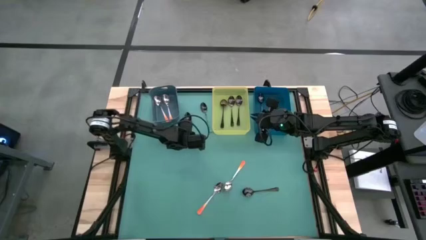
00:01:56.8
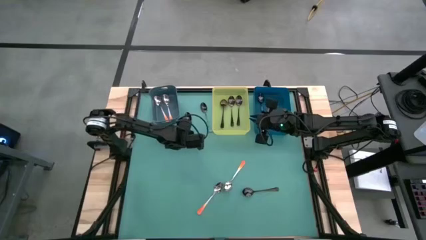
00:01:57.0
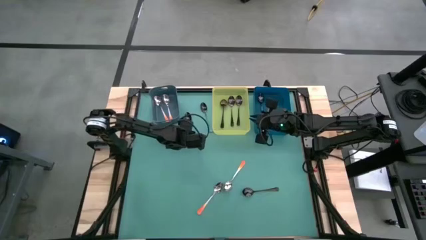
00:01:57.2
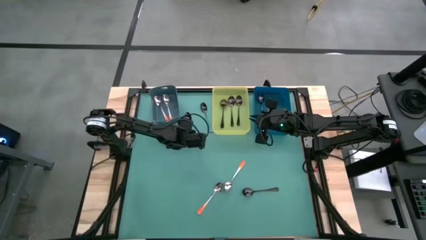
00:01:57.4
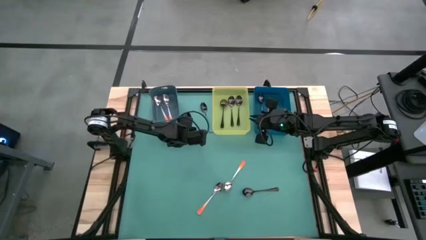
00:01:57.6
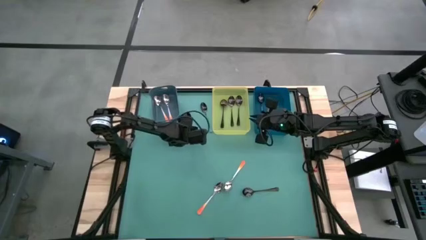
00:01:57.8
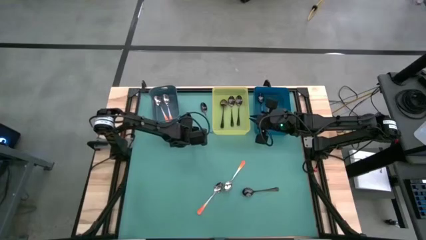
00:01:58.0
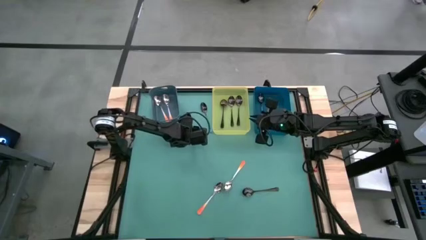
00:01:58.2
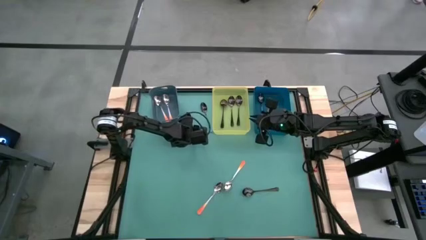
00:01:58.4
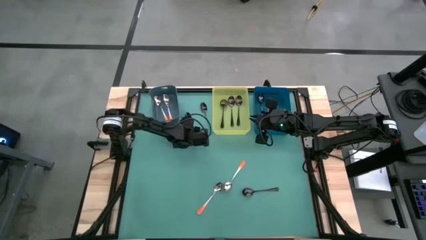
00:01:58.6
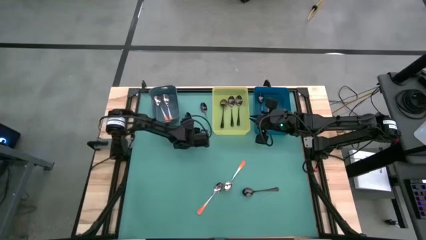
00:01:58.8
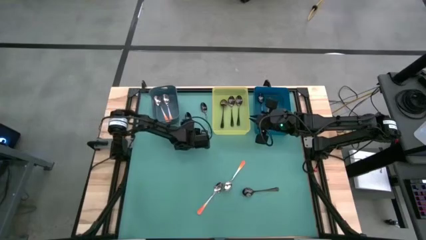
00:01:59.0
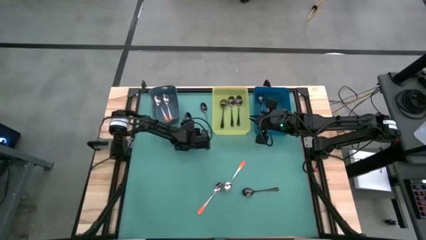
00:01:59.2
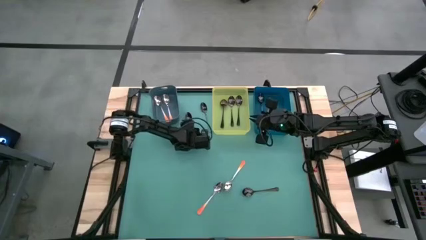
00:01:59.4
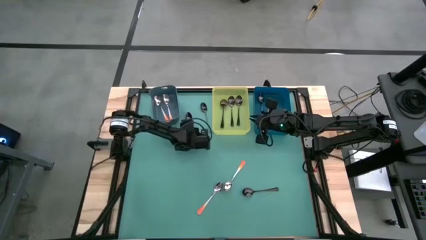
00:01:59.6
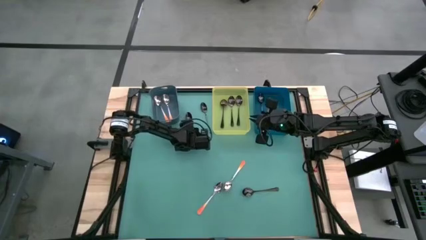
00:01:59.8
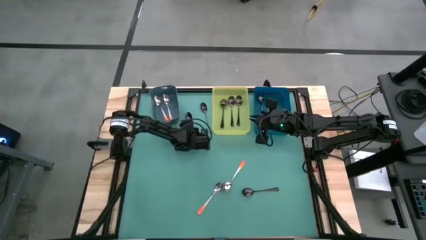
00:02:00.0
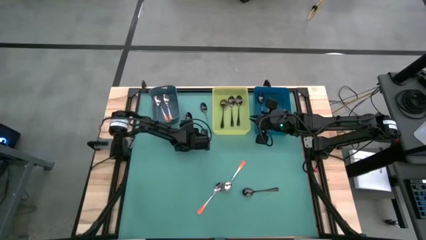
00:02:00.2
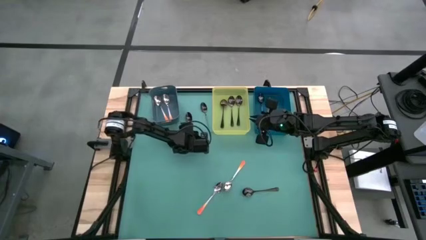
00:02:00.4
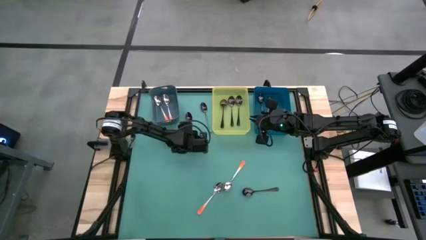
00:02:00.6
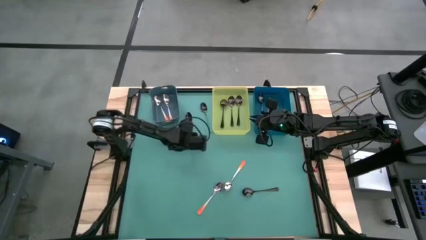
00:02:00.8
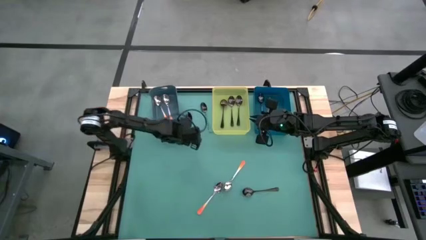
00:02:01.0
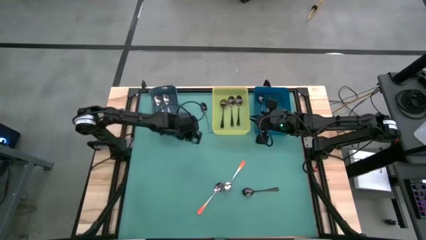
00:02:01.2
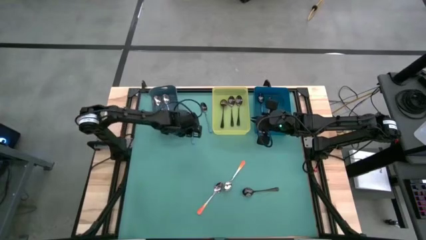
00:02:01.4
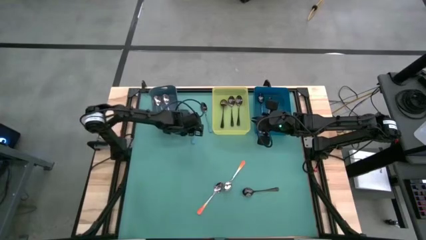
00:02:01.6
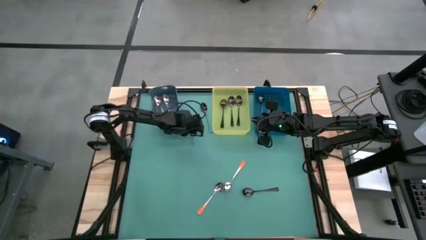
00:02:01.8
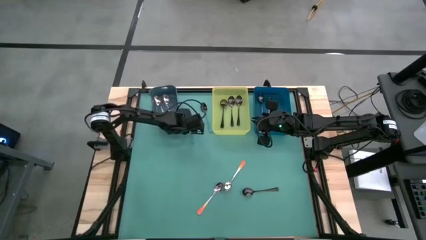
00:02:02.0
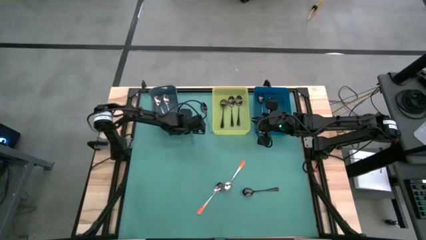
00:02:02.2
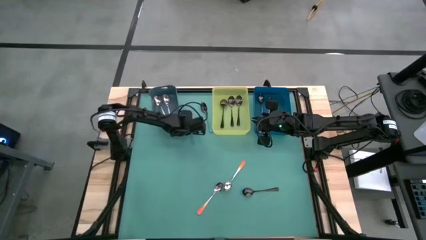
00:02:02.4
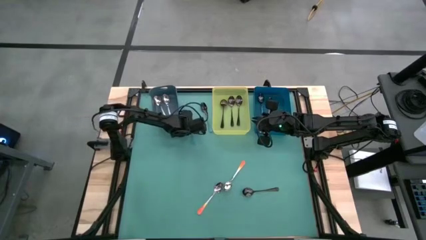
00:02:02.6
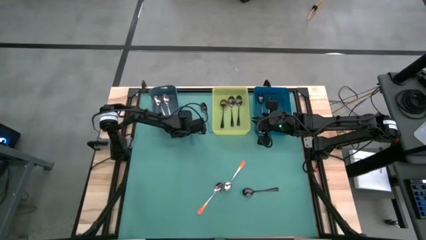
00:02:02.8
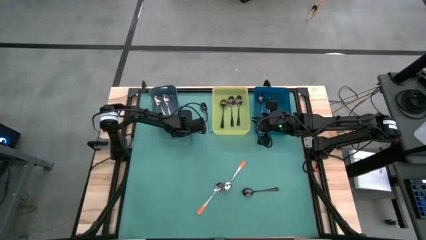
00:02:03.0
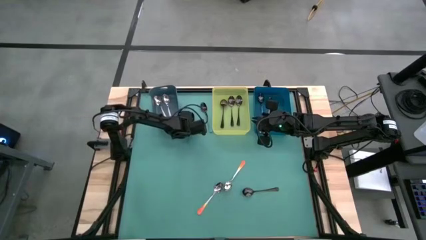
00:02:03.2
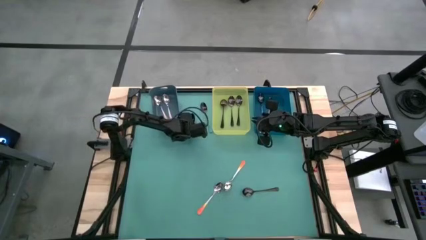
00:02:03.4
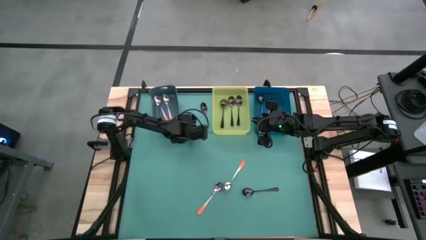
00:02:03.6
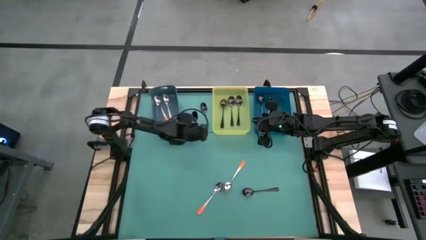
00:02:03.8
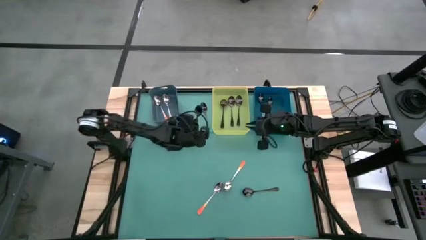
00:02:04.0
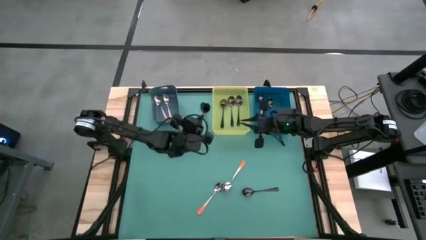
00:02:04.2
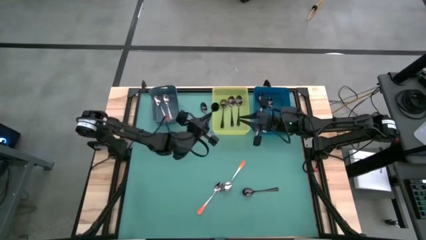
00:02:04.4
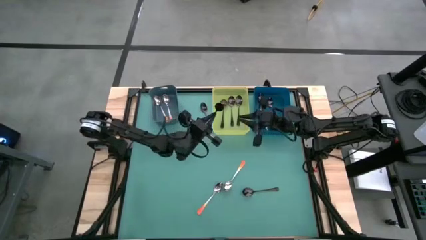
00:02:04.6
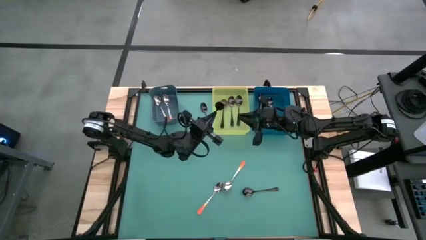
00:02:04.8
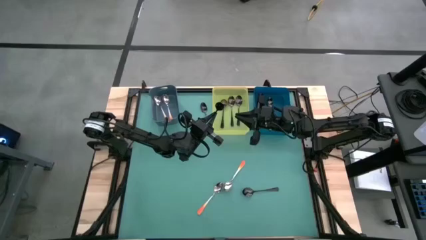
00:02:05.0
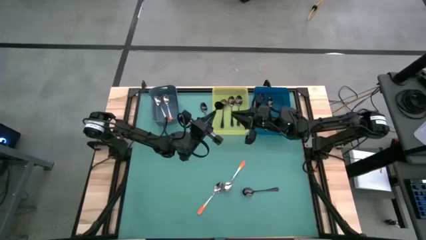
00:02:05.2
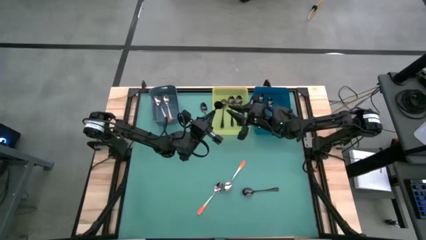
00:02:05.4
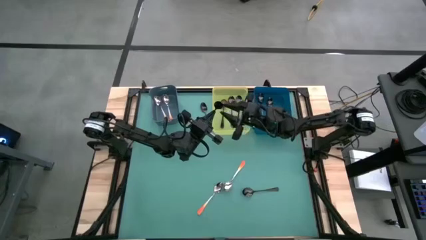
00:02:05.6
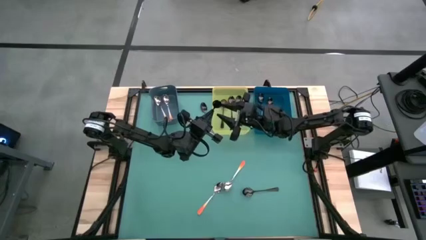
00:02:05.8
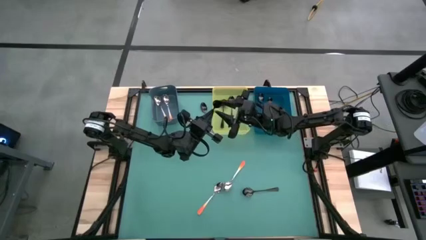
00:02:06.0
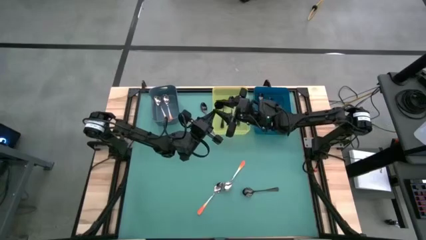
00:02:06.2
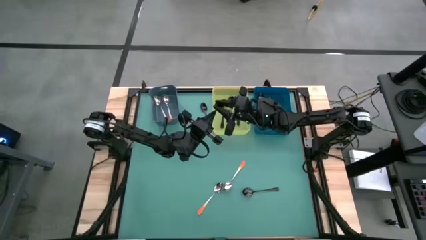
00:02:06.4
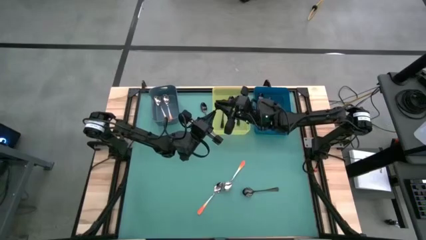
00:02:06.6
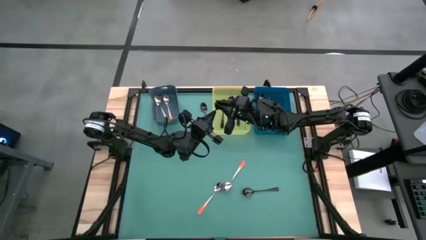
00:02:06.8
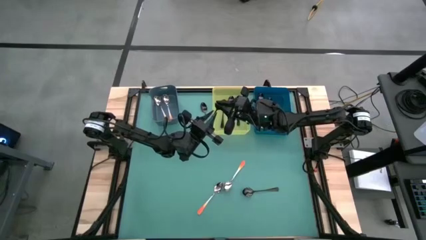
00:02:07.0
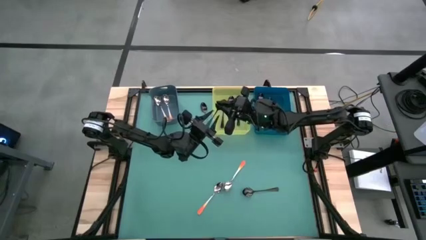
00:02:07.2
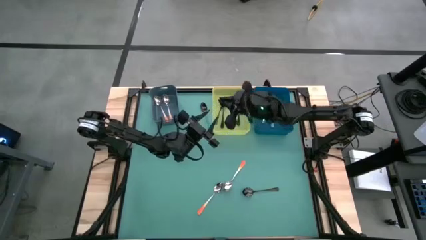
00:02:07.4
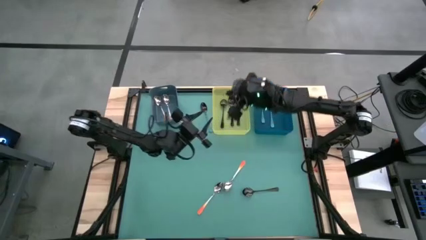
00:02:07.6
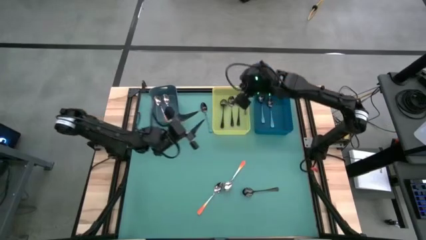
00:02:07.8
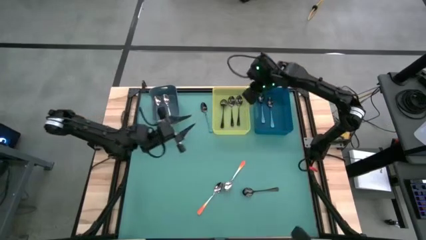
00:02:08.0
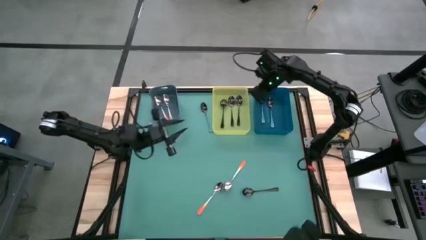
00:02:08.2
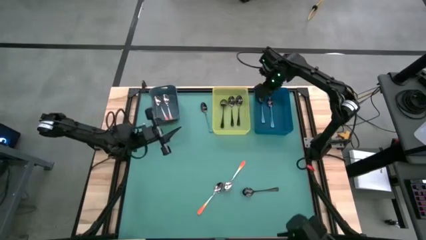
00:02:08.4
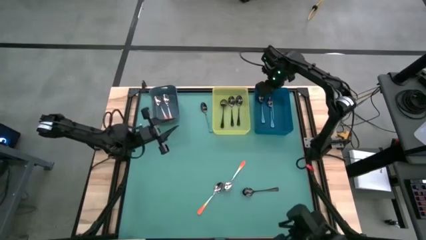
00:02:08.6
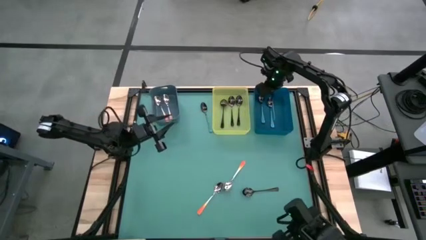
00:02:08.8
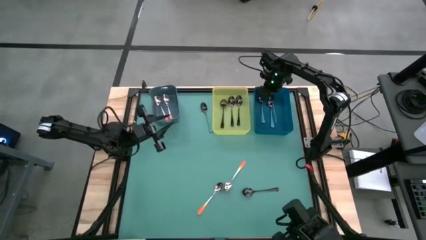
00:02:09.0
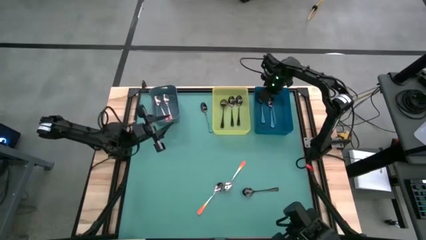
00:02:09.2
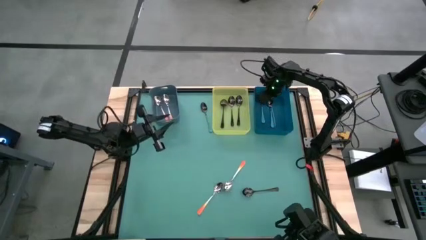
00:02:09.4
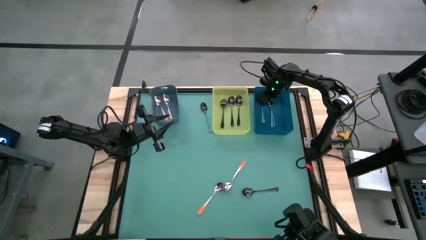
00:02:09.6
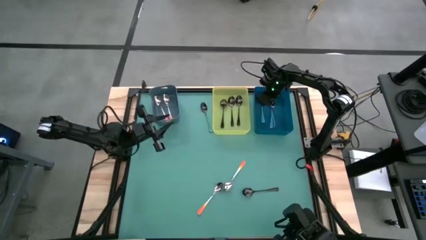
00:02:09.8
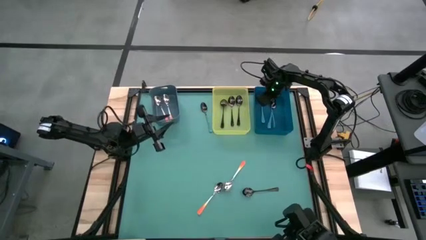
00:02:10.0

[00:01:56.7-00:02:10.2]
Task: Sort silverware by color (type)
Put the blue spoon into the blue bin

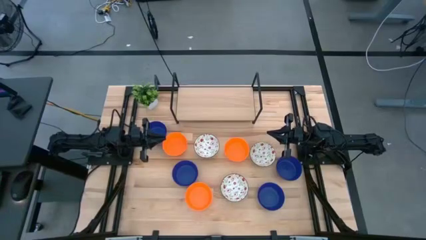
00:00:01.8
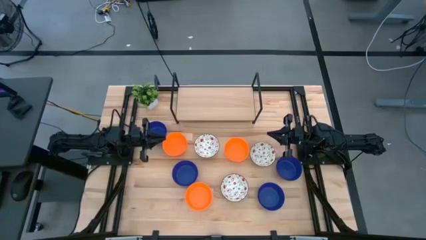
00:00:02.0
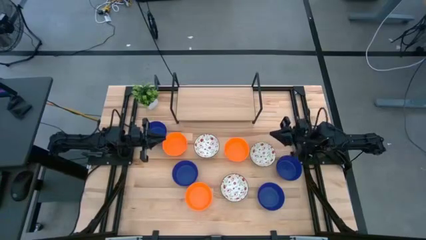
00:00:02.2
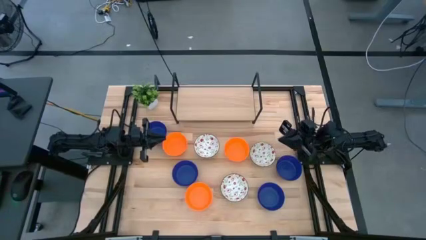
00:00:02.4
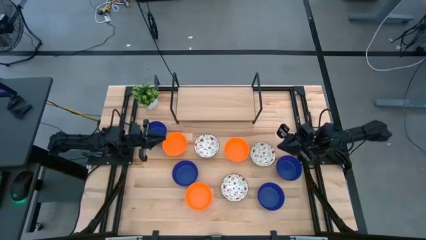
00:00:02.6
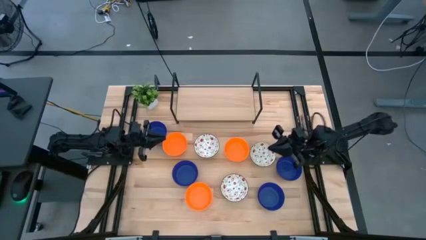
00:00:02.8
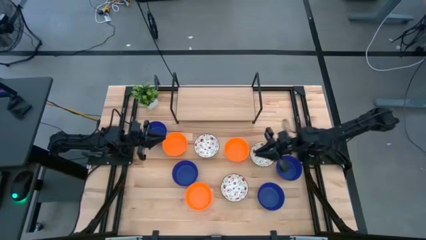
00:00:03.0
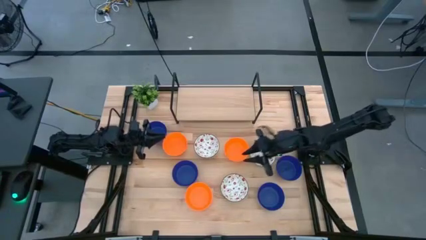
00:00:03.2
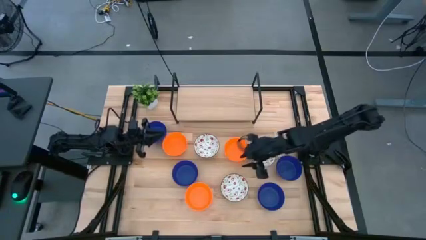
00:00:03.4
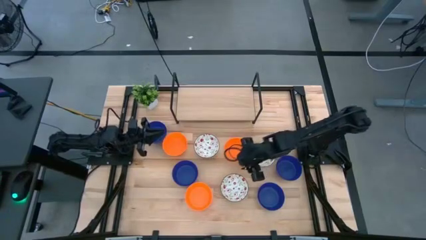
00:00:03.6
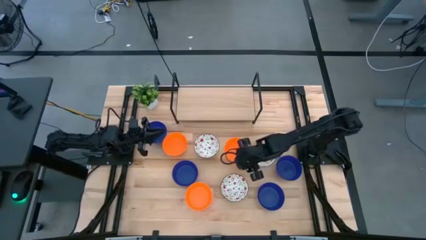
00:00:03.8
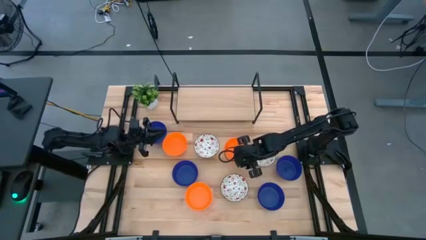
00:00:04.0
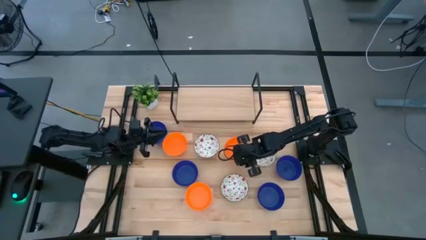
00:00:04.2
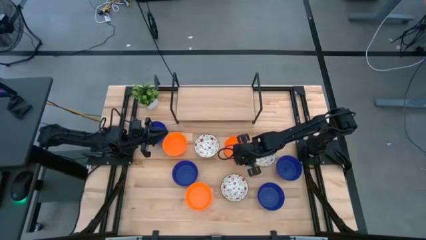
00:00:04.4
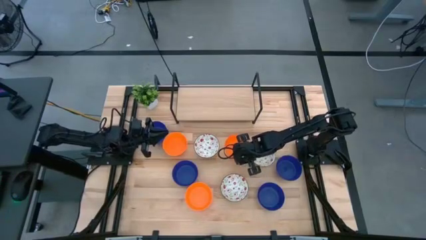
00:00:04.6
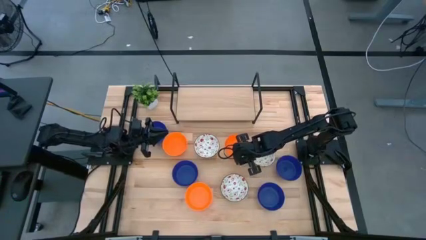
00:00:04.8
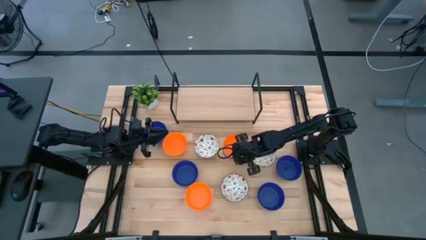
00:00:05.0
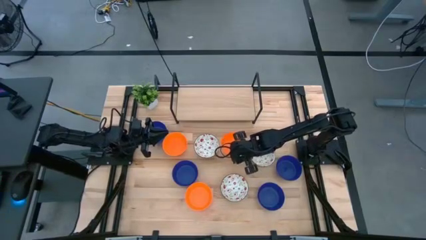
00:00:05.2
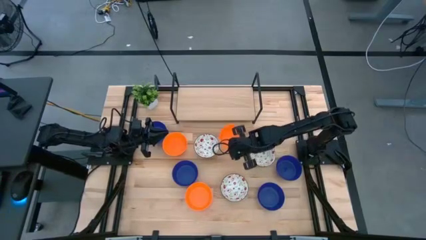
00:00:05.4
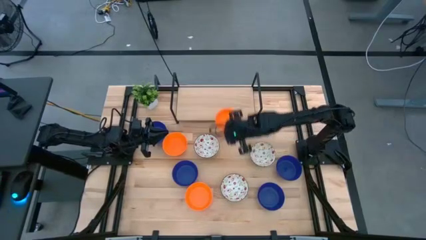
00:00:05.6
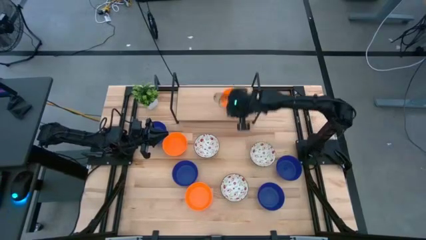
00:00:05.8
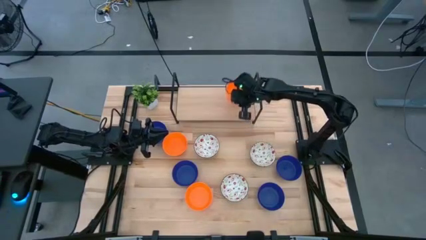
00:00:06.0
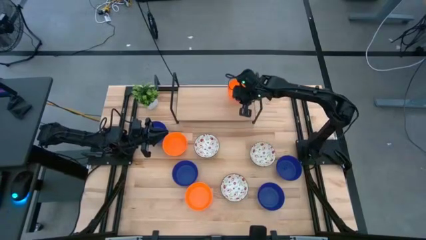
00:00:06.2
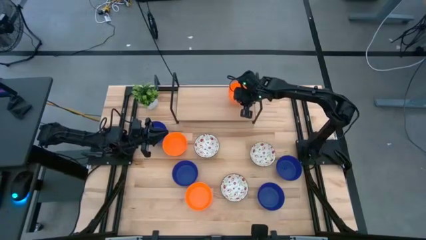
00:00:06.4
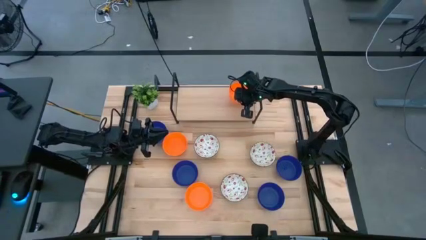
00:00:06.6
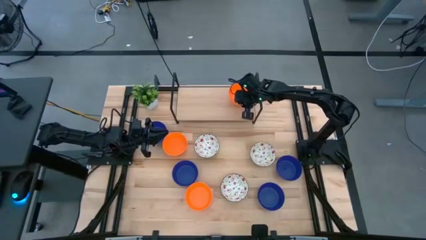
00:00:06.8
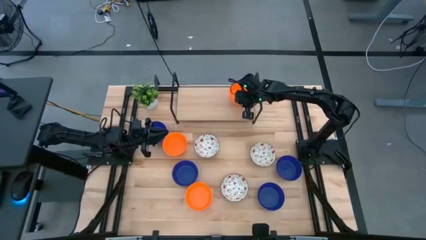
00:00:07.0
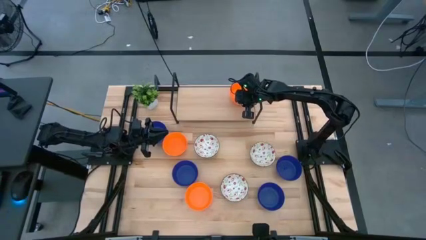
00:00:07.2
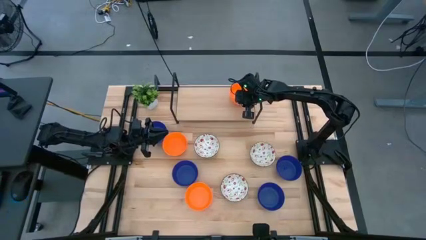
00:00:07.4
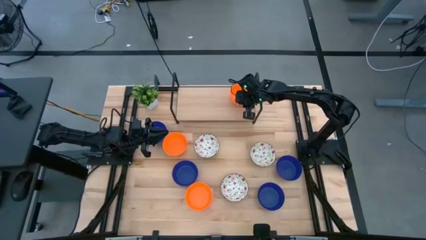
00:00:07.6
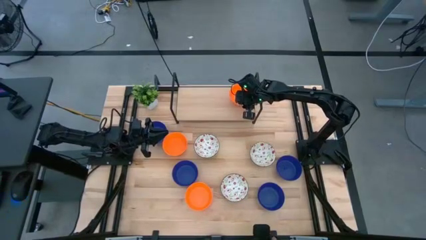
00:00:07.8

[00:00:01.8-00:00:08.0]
Task: Pick & Place Mini bowls
Put the orange bowl on the shelf
